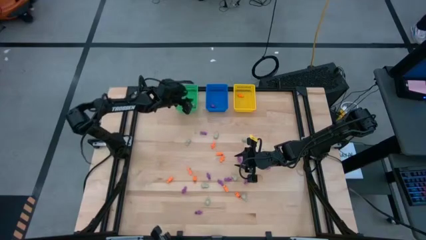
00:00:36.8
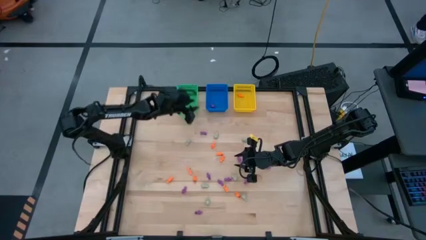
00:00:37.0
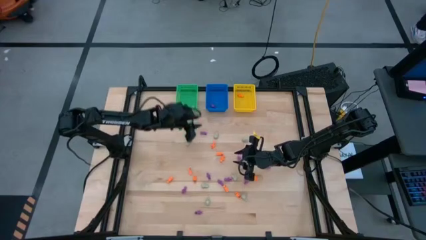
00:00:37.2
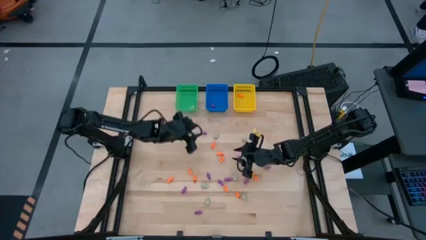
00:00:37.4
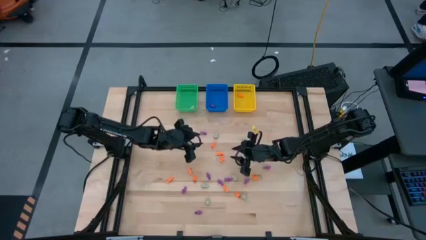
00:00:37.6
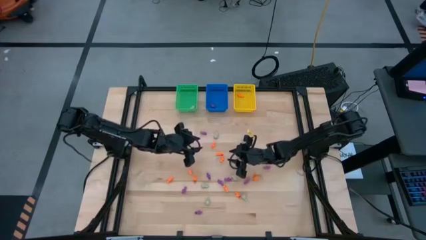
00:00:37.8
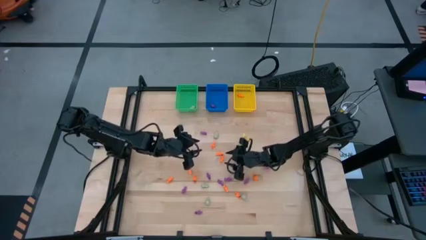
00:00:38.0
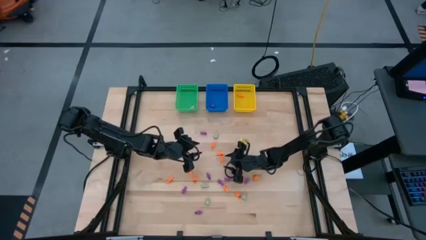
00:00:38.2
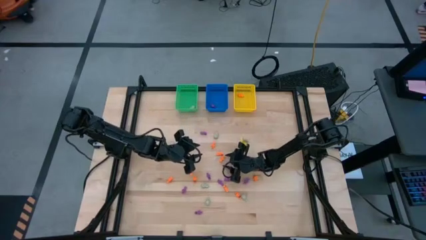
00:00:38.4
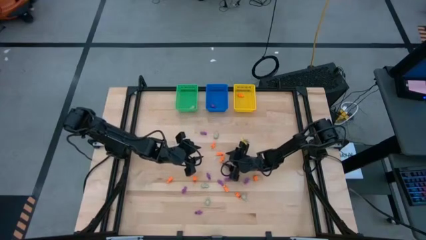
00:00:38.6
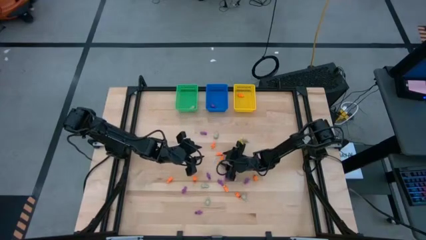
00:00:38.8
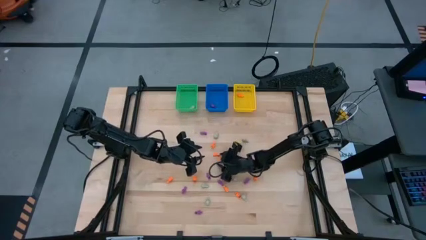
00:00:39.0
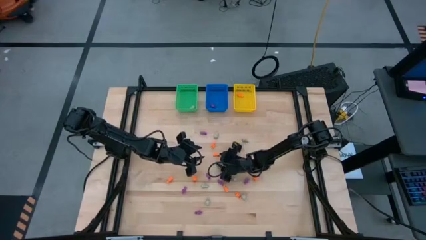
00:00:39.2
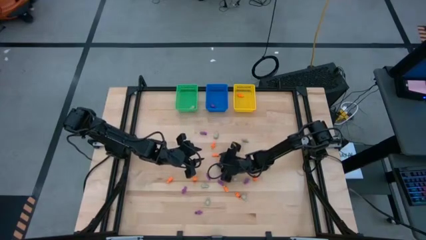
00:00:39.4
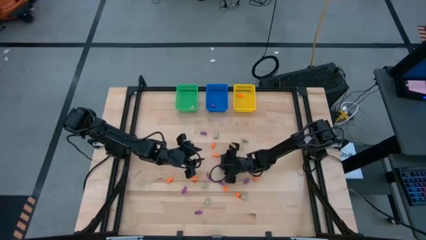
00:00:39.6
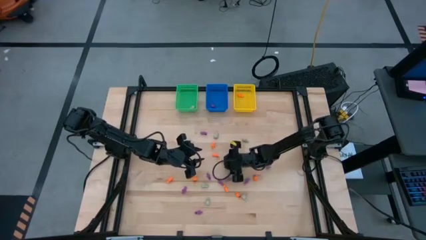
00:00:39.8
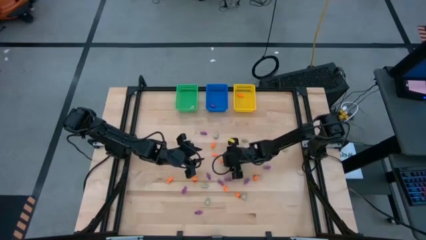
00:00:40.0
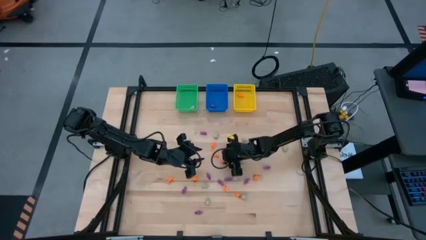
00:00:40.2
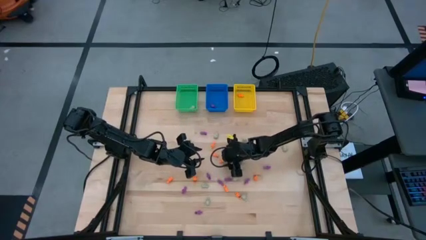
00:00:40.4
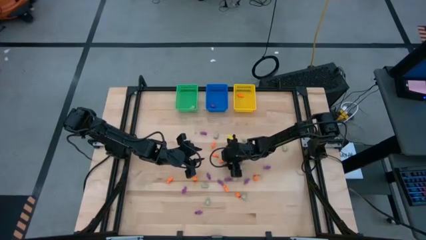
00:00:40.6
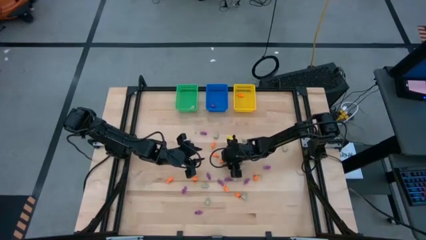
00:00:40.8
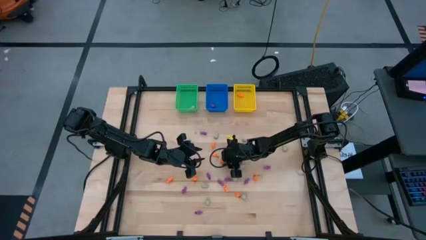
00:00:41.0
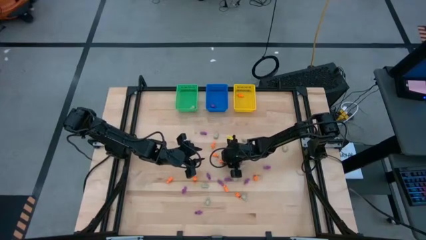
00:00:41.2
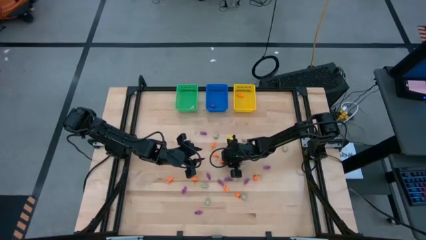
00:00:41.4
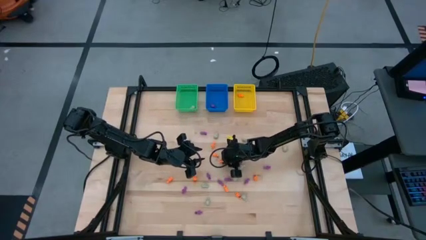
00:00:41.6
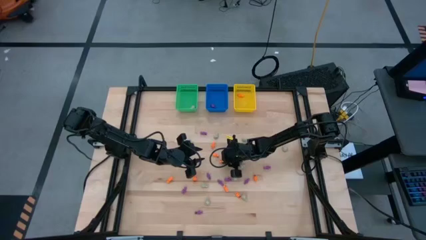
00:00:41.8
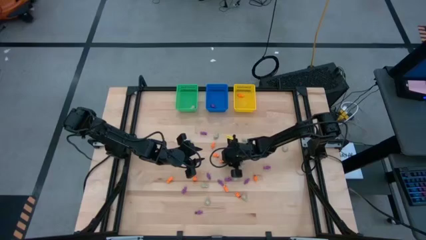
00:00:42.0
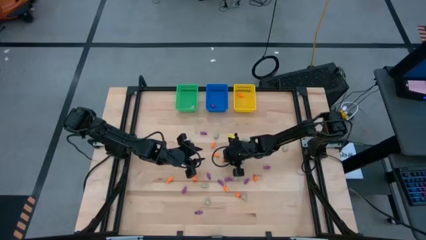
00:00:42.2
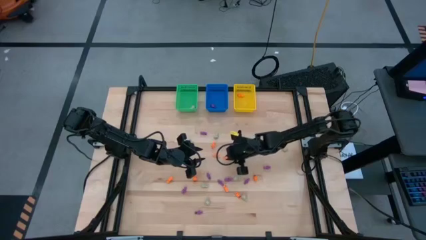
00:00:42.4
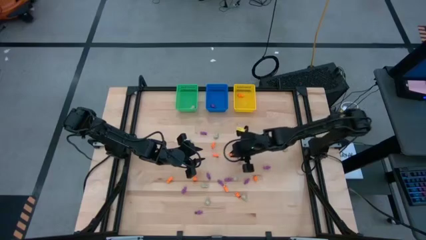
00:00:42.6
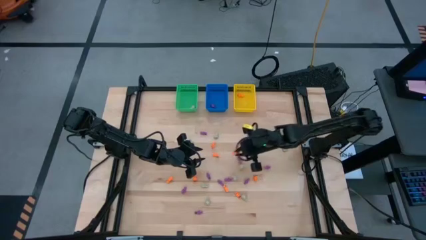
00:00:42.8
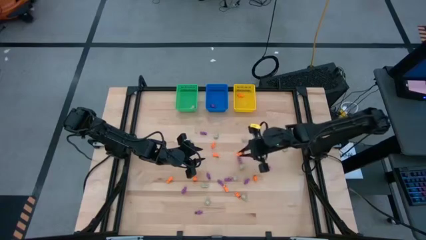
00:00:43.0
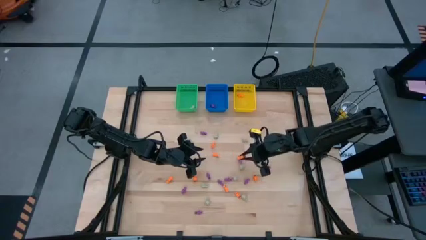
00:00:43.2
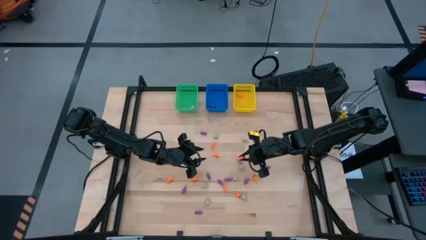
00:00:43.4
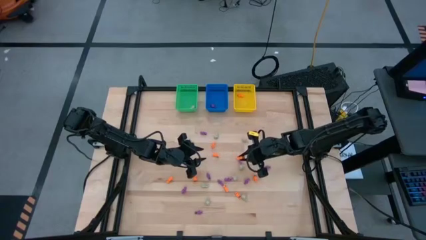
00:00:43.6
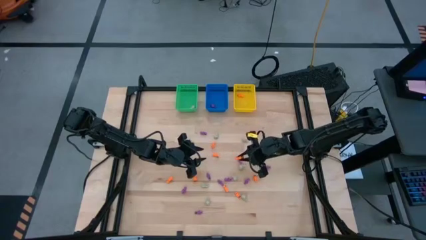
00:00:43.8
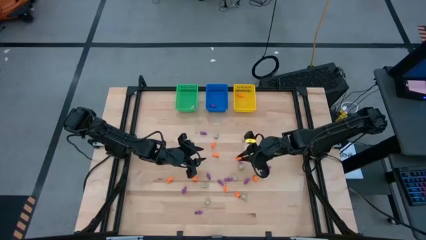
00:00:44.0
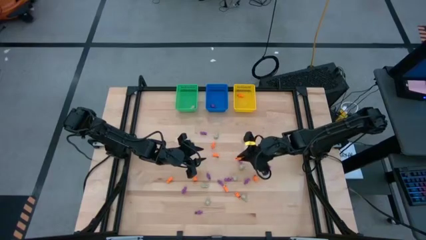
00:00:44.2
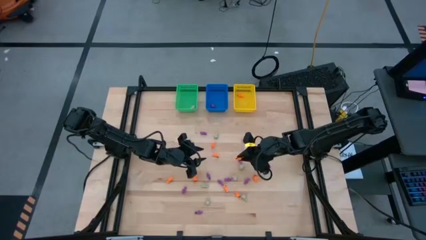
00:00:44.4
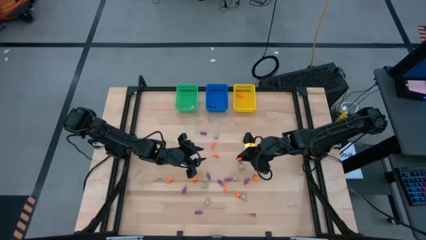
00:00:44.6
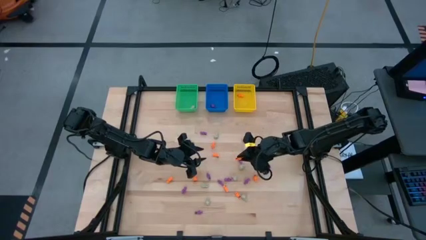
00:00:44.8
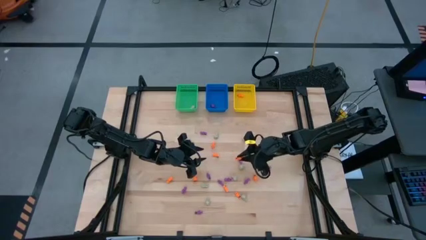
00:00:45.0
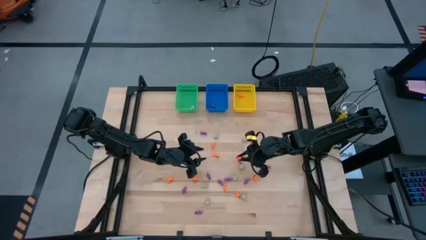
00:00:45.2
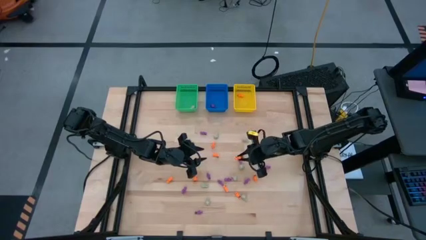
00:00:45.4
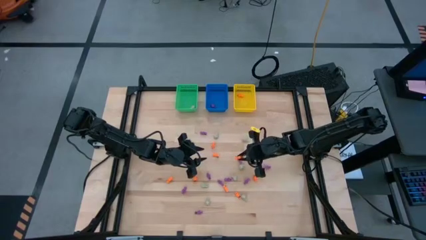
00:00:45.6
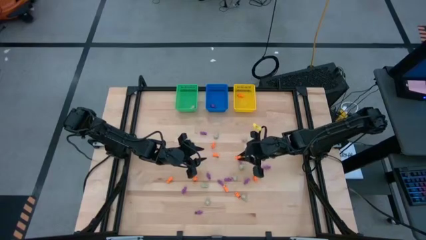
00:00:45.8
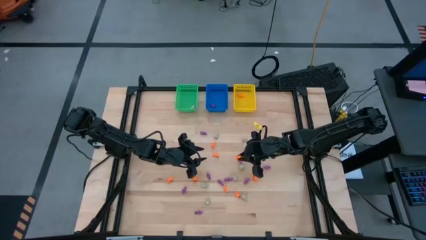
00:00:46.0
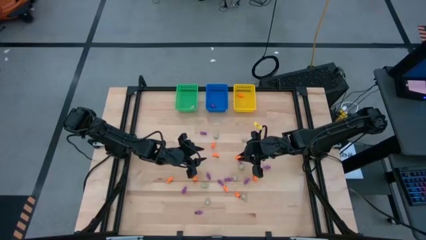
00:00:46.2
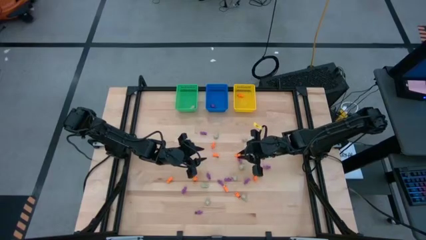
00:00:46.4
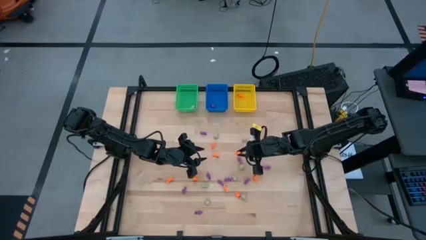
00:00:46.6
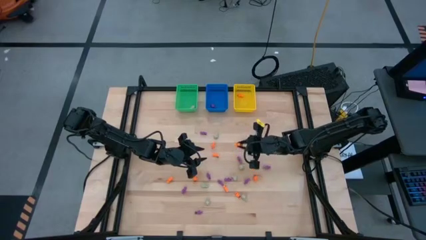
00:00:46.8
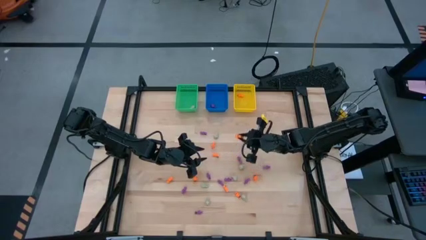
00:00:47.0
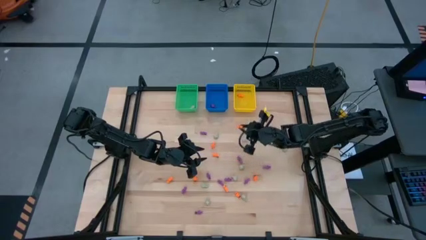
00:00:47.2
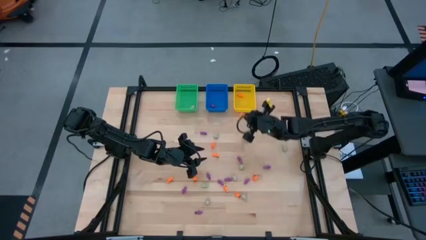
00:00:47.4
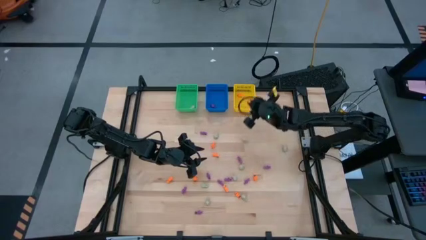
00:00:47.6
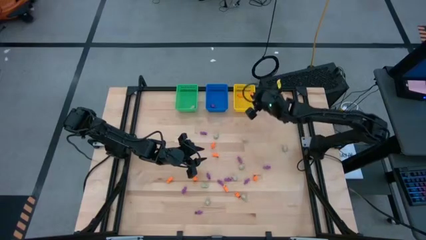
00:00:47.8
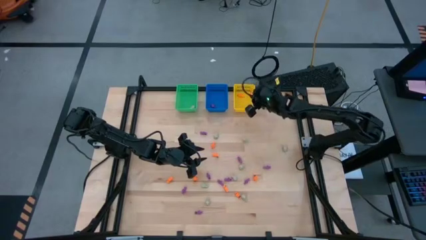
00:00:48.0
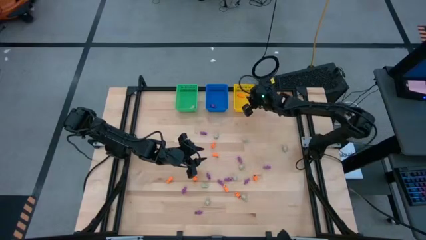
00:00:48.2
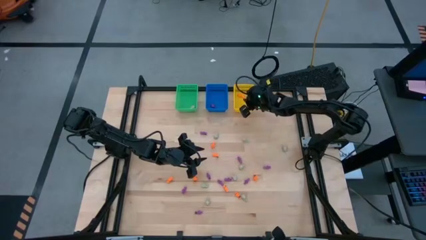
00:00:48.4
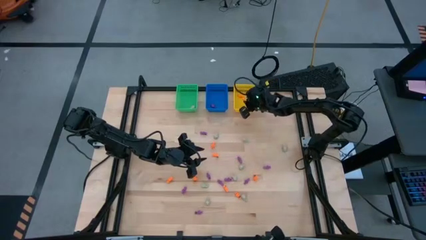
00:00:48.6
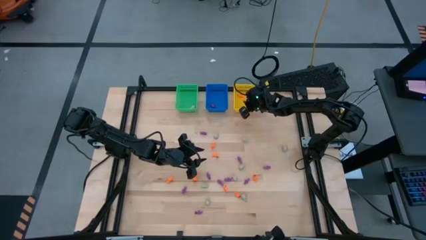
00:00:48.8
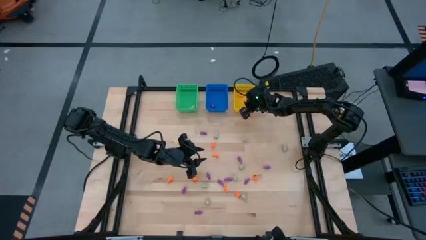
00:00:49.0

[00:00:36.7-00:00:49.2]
Task: Sort Halloween decoration
Put the orange skeleton toy into the yellow bin
